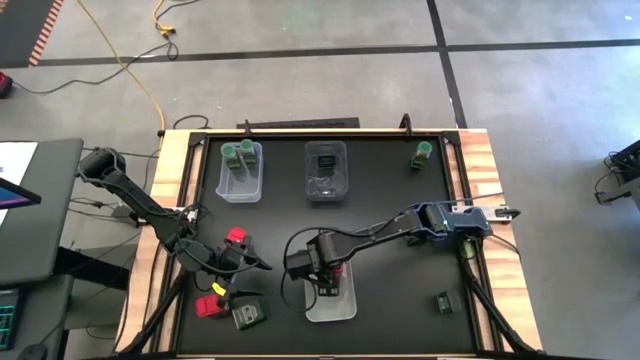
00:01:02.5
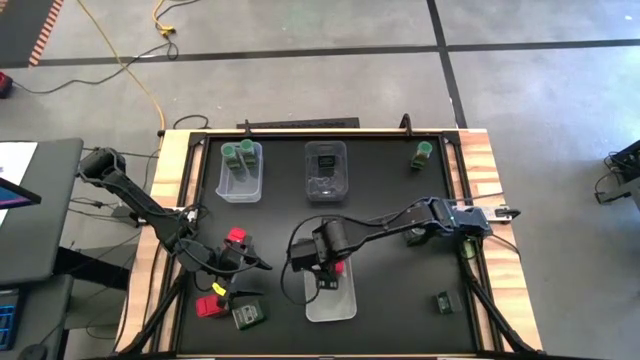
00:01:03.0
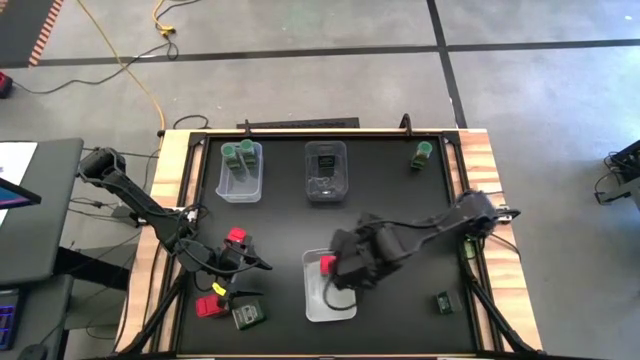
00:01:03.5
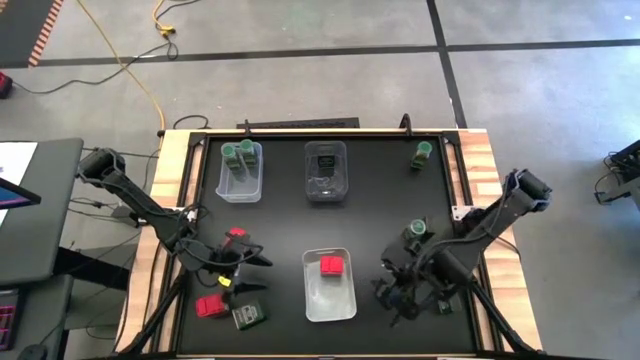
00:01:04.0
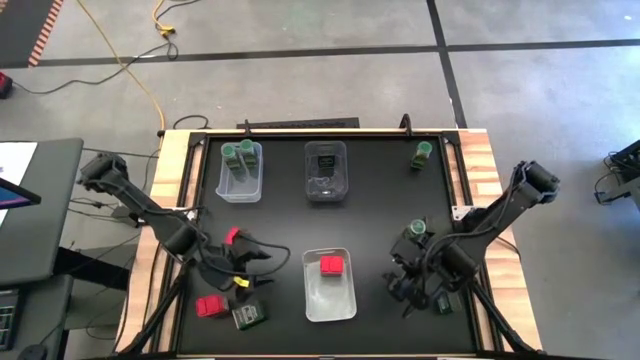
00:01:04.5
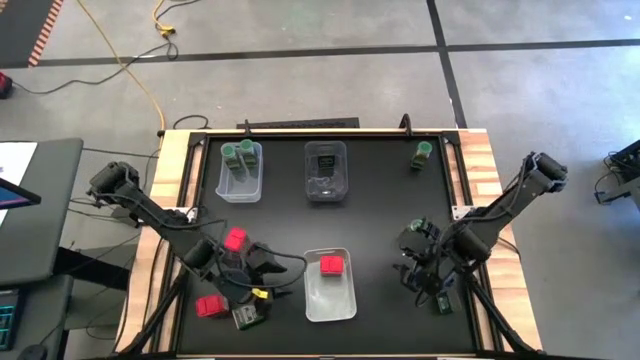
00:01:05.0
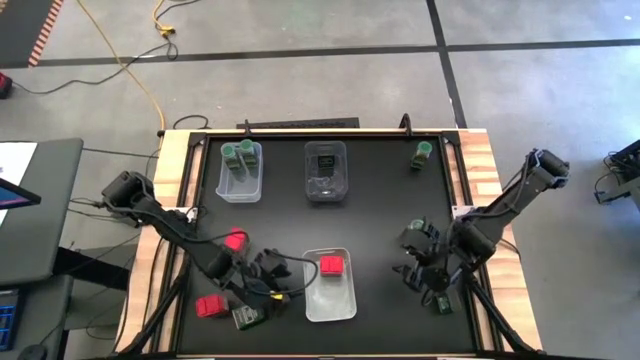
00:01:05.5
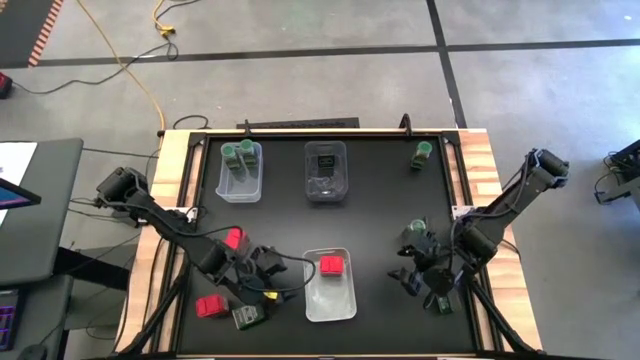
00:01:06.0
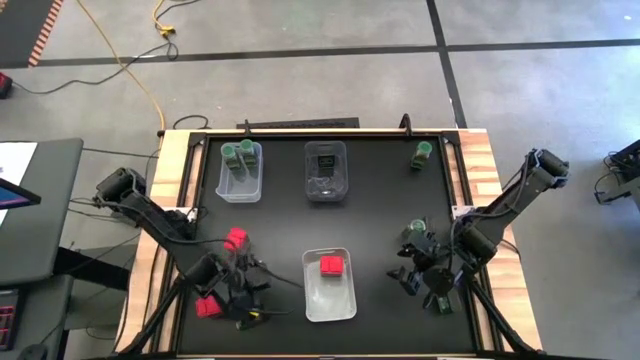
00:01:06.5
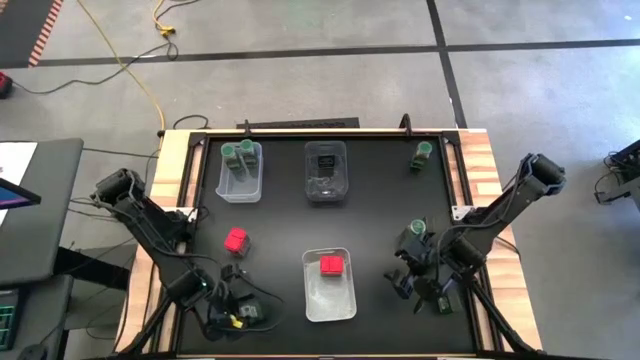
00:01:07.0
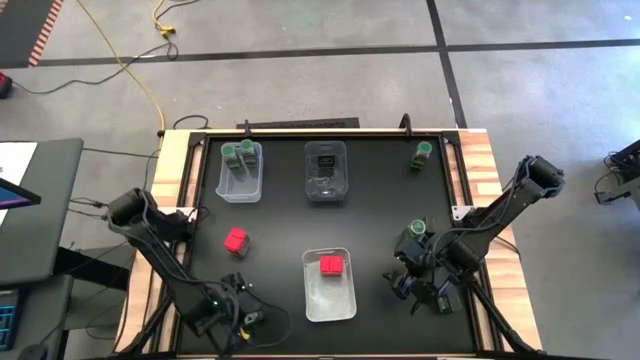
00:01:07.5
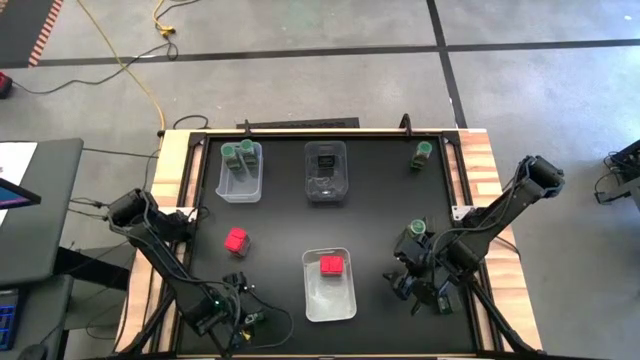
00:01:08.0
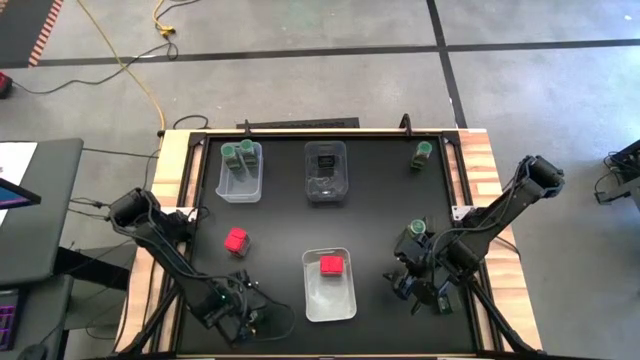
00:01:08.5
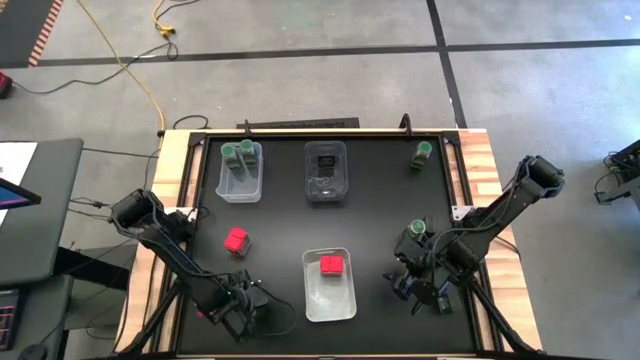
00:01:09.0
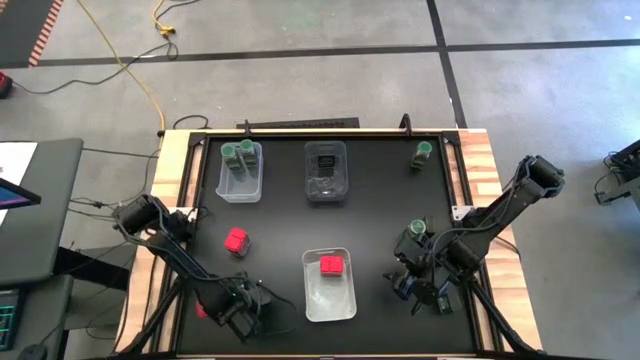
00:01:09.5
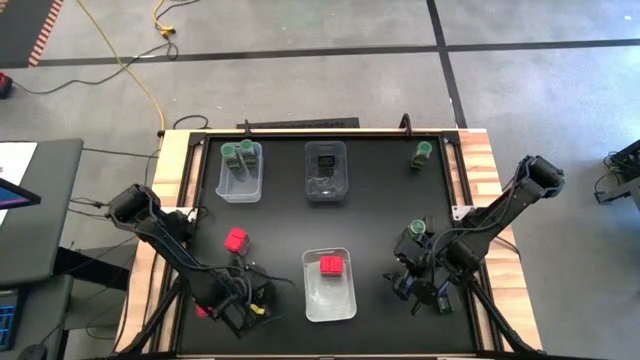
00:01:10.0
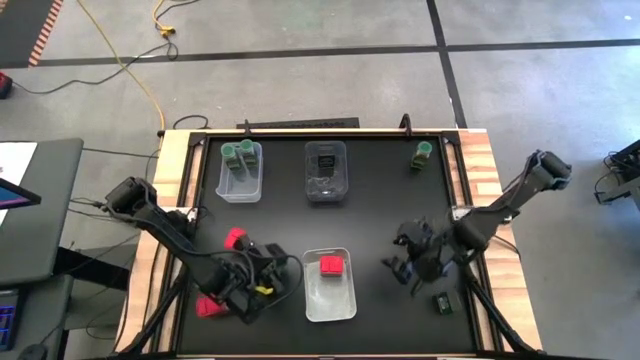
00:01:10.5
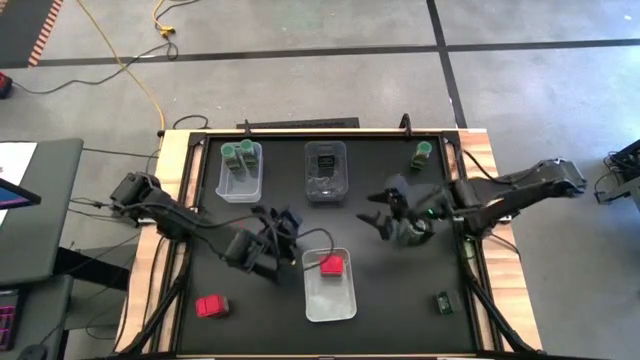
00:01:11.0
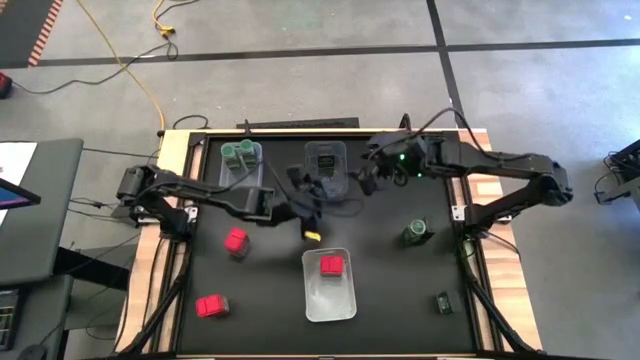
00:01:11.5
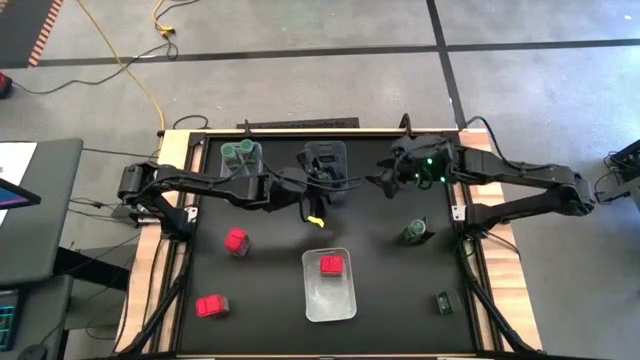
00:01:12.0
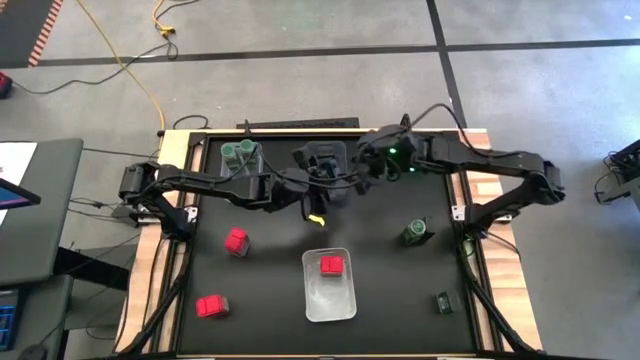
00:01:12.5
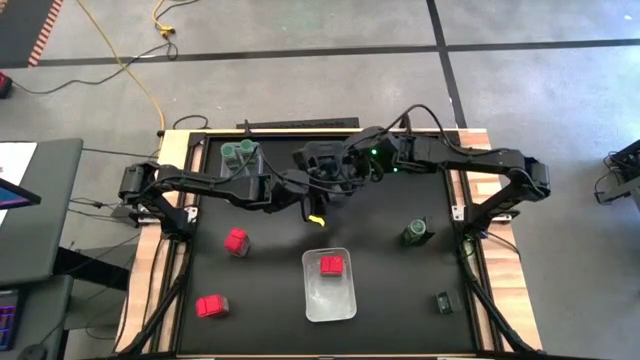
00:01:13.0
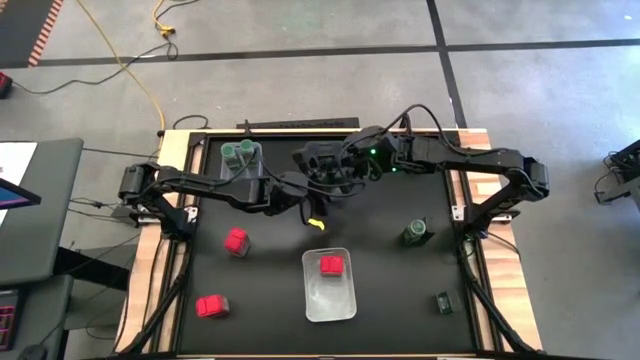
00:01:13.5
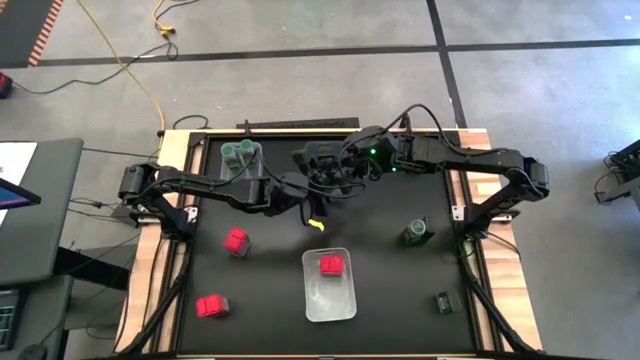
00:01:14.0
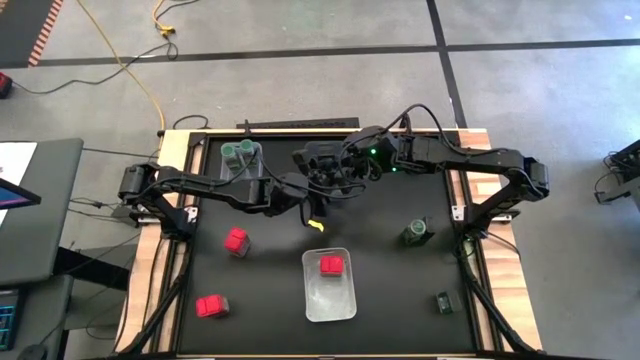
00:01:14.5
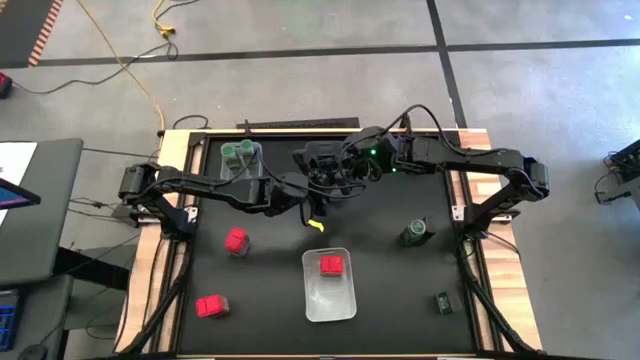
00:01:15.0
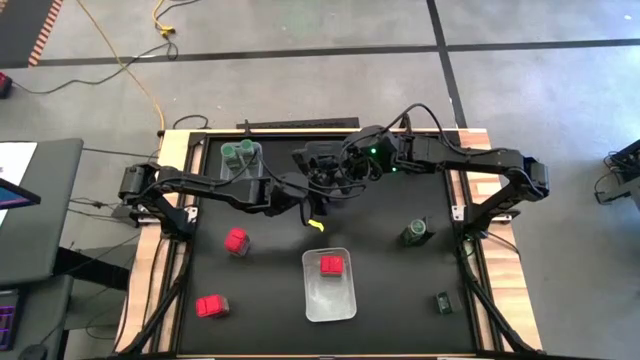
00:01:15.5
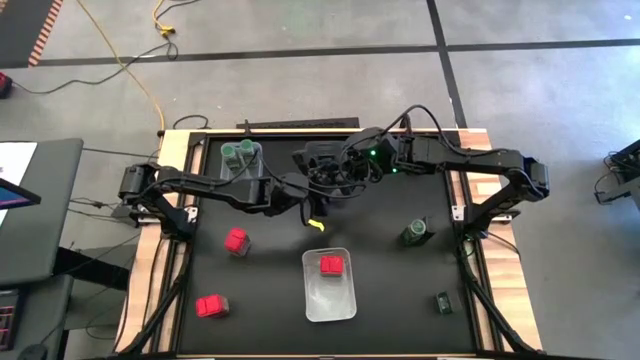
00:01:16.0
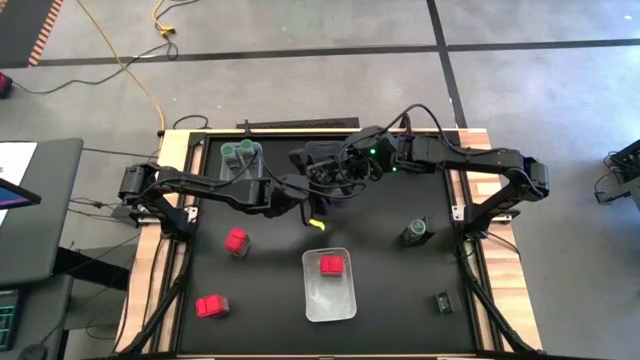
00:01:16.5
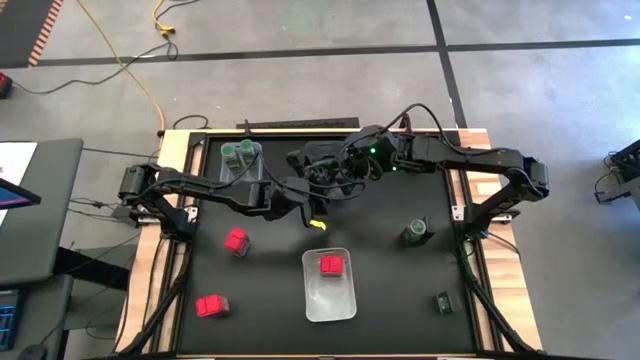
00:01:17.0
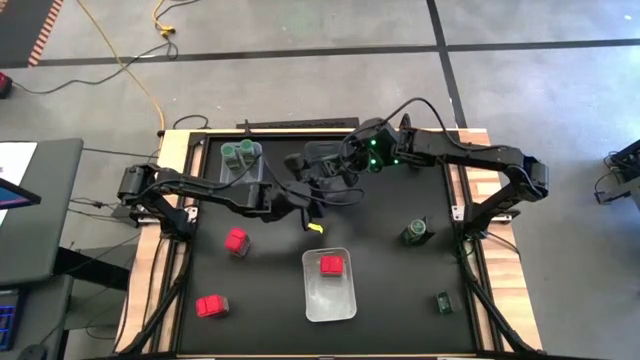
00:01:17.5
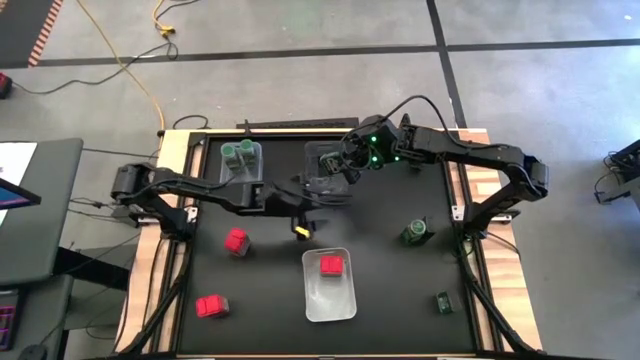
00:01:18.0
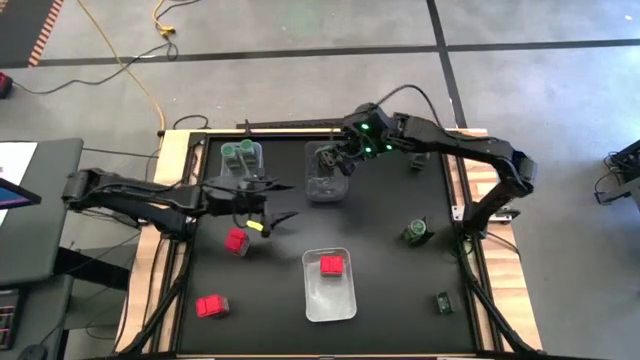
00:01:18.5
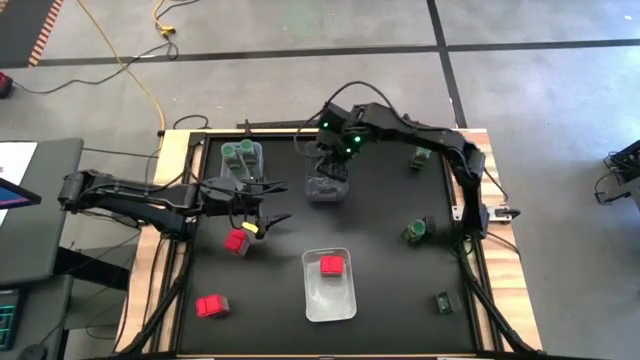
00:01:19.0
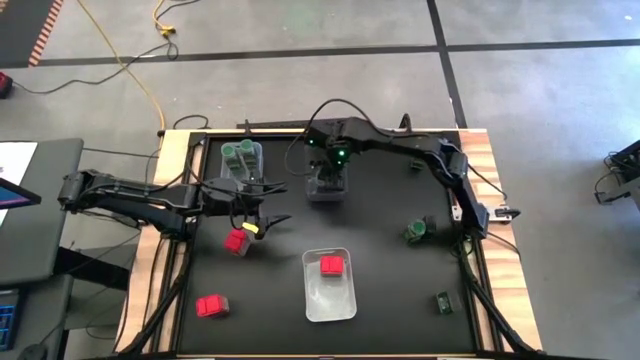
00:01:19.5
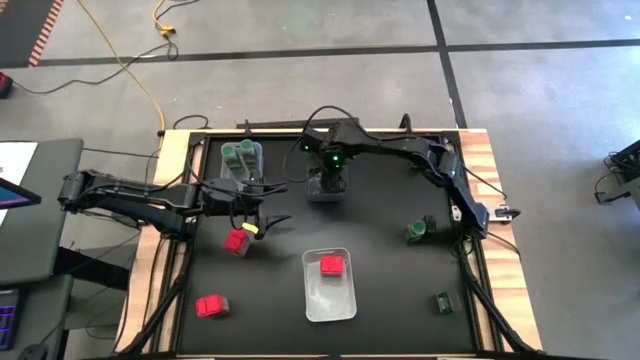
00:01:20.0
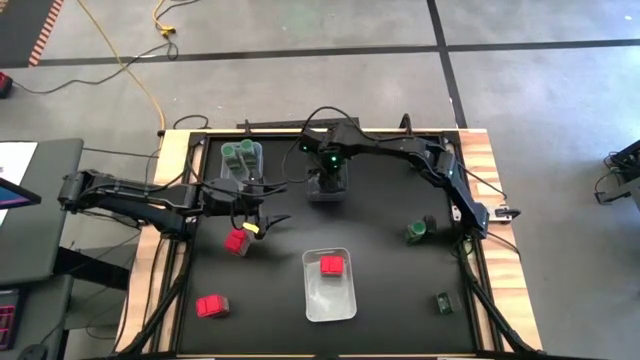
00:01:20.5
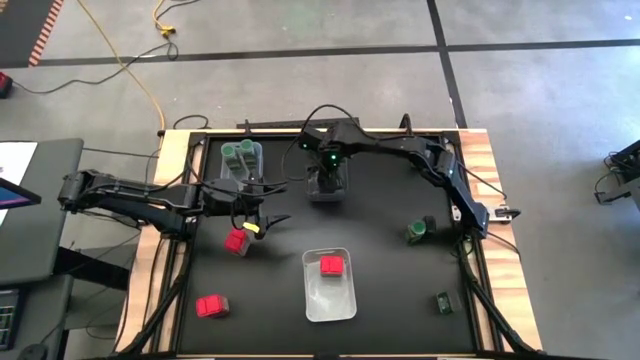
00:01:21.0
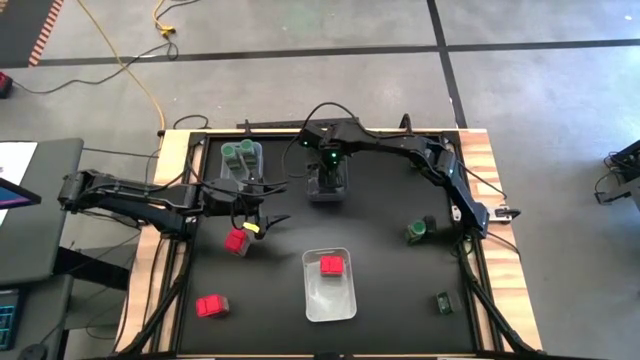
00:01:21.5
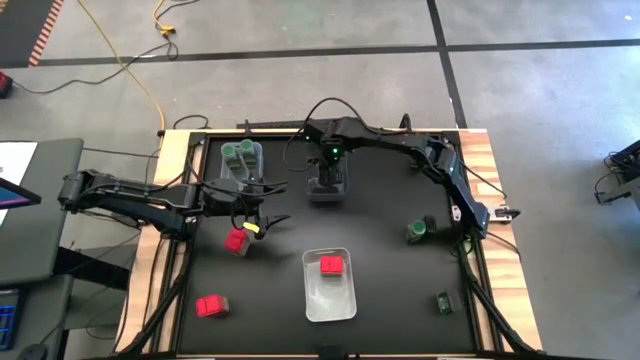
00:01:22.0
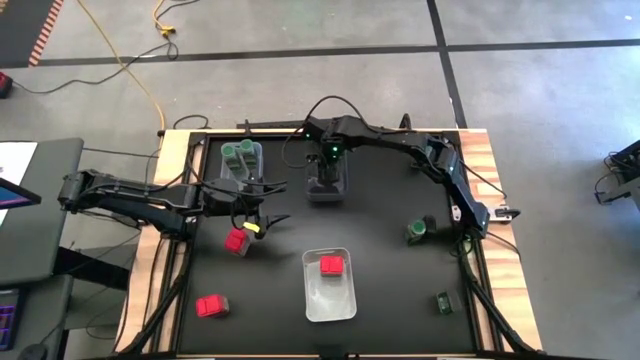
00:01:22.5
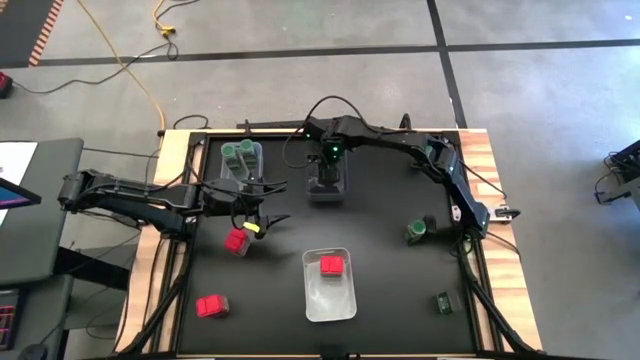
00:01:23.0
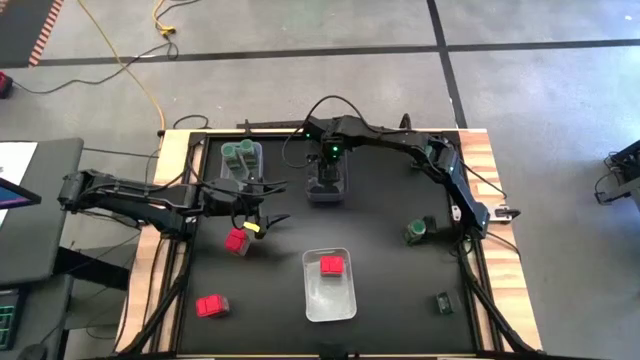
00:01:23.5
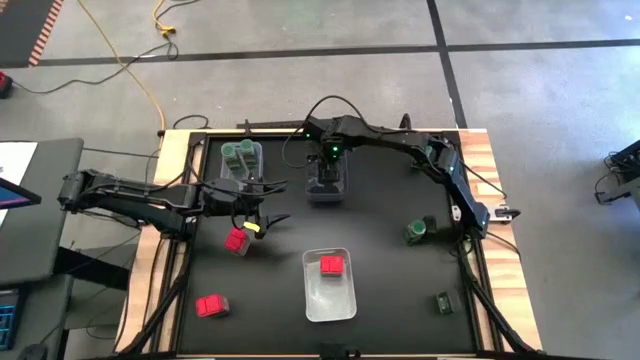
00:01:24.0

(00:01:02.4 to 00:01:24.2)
Task: Sort spices by type
Put the bottom left black seasoning can into the black bin
